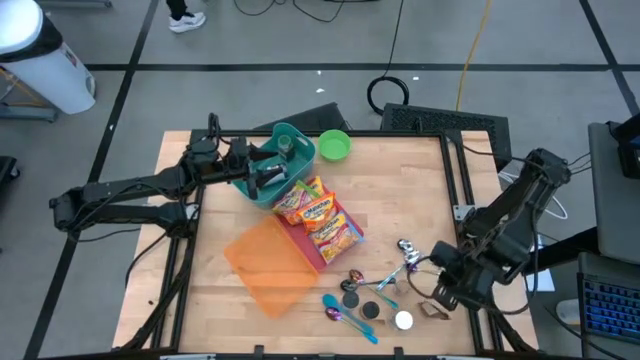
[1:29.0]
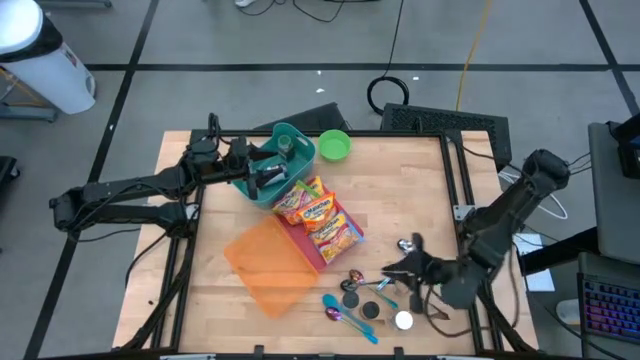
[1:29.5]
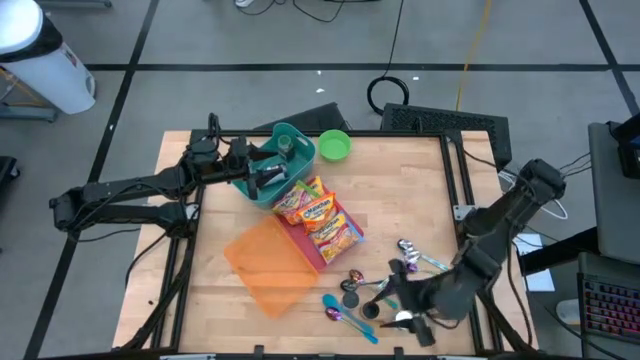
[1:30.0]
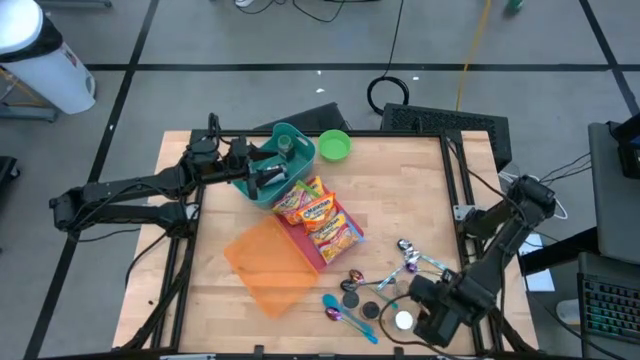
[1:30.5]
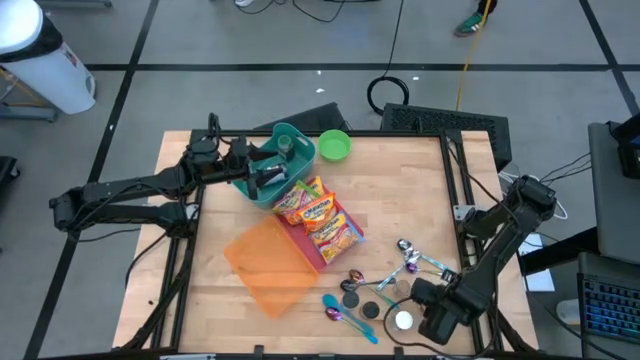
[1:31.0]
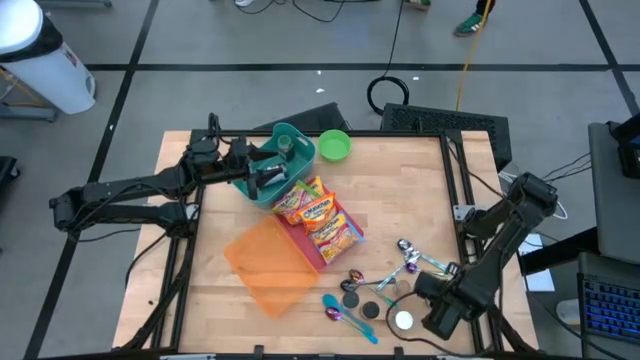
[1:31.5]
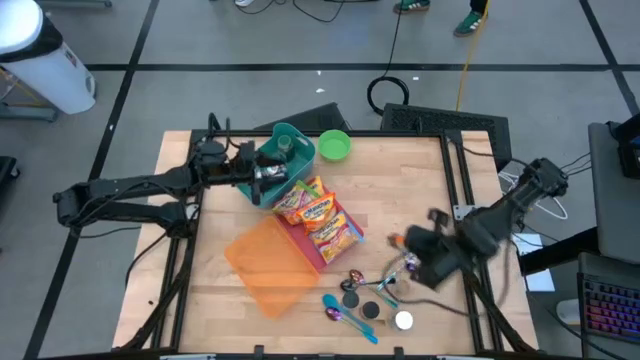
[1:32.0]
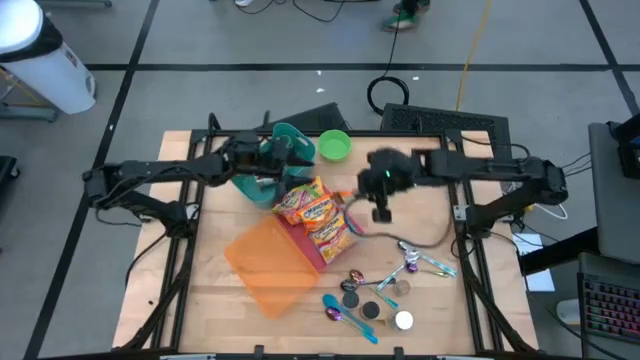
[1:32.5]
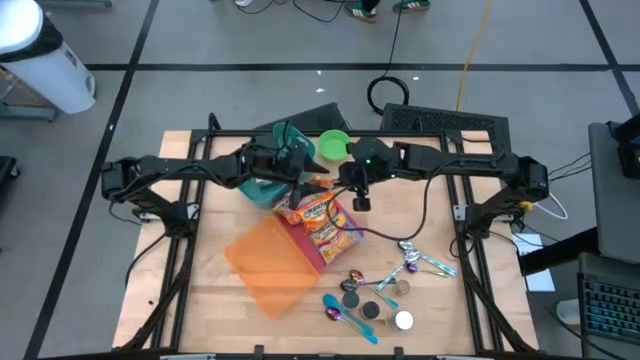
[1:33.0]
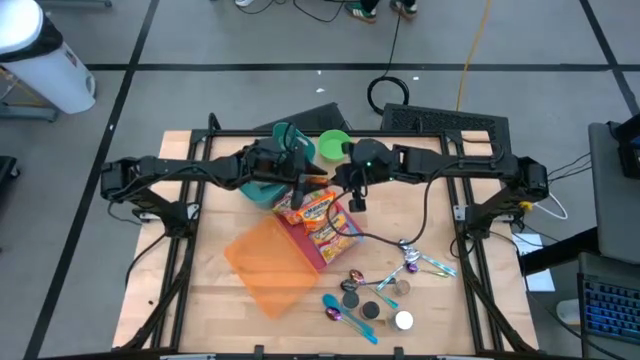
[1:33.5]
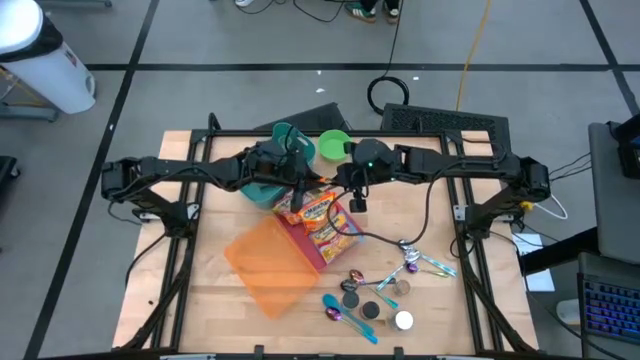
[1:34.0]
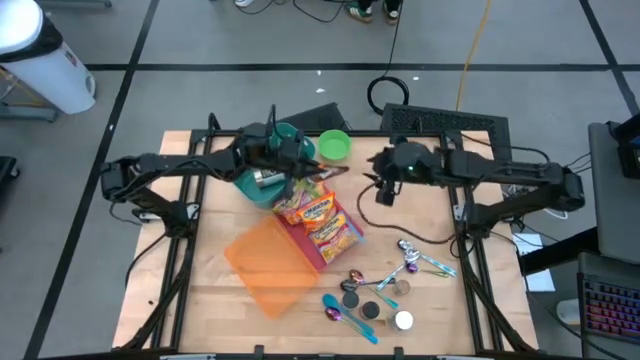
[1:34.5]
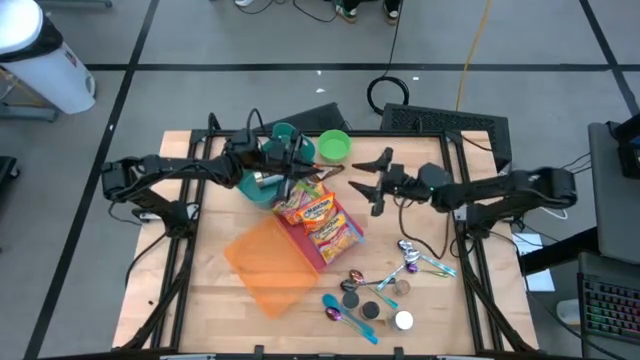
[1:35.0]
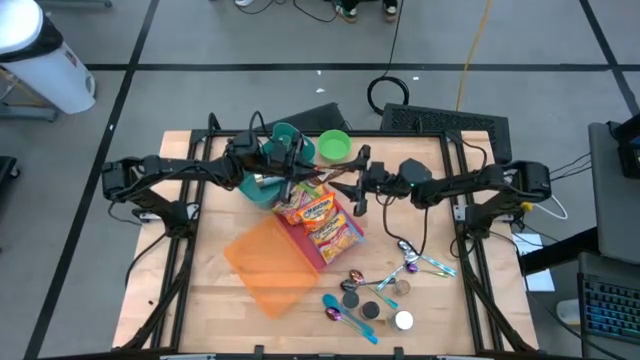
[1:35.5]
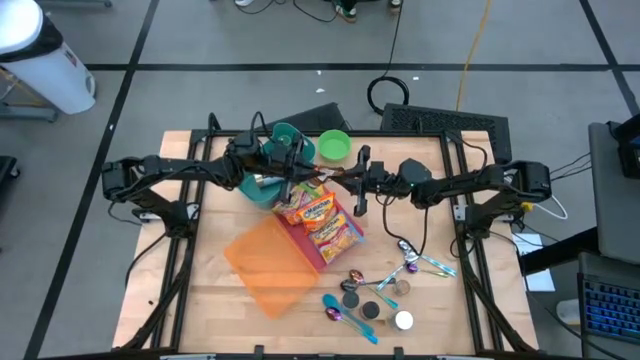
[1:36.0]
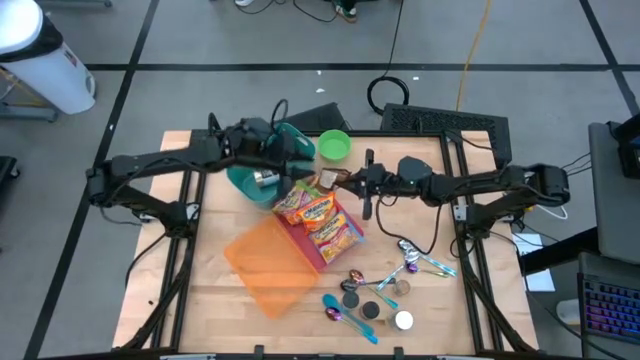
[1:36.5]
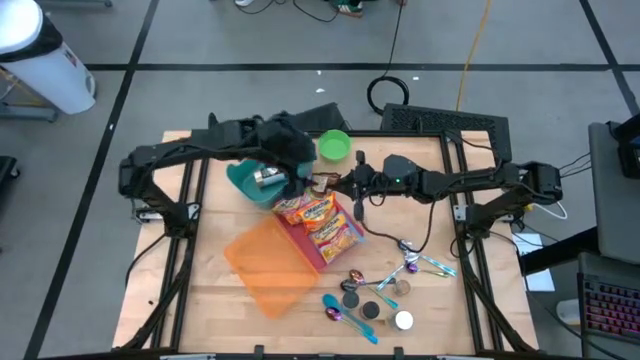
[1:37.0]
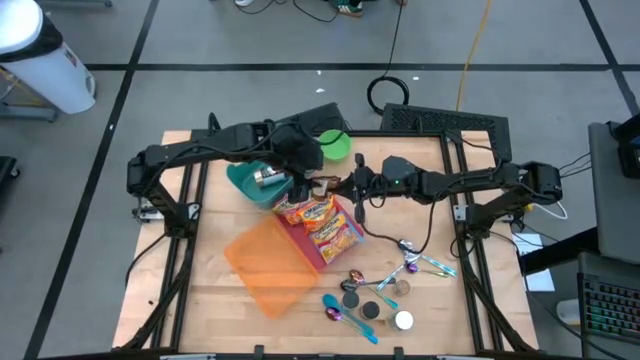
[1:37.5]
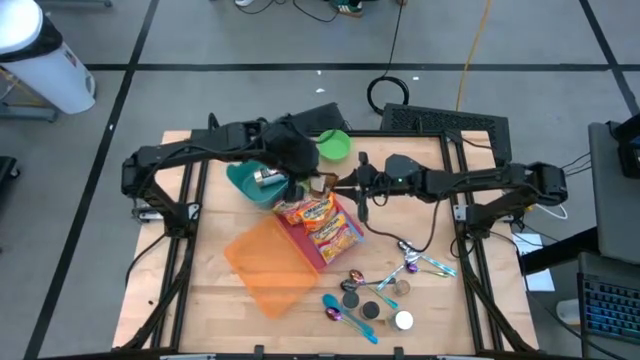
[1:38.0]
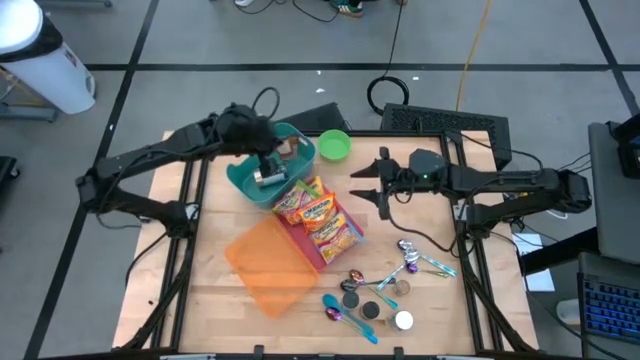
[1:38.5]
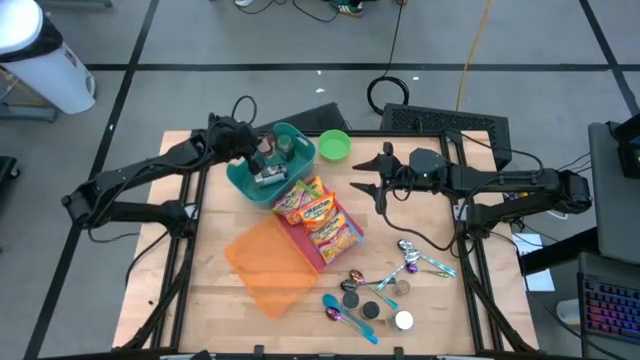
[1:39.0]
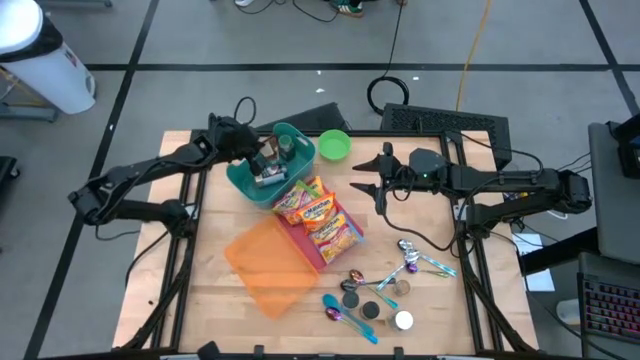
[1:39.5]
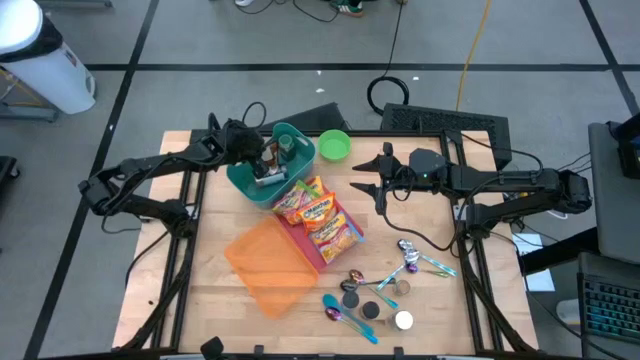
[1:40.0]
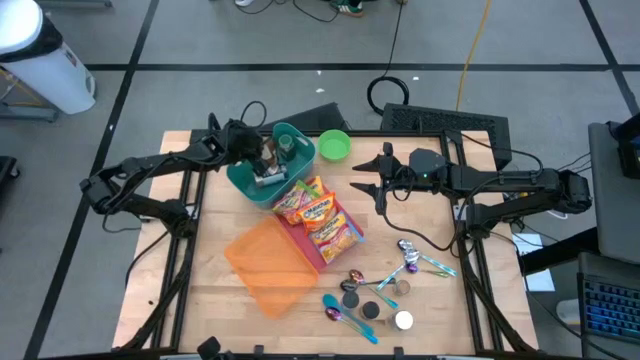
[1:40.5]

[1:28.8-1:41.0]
Task: Pick & Place Food Item
Put the orange seasoning pack into the green bin

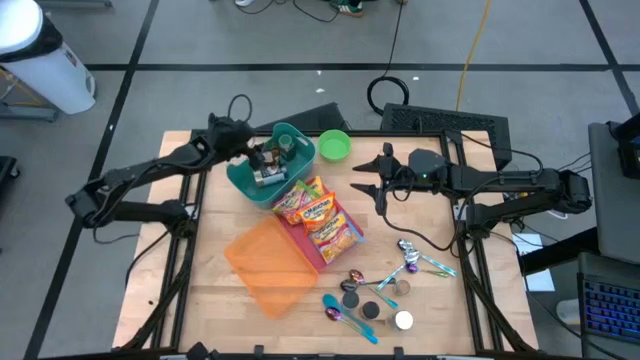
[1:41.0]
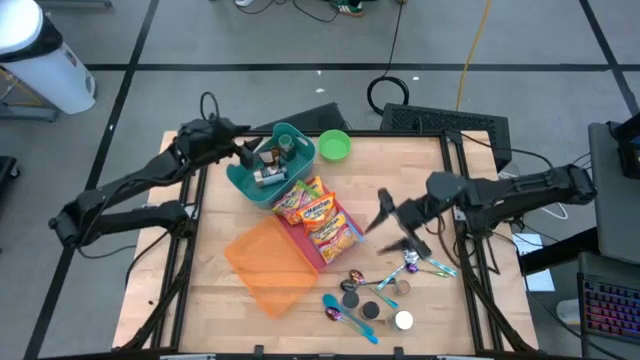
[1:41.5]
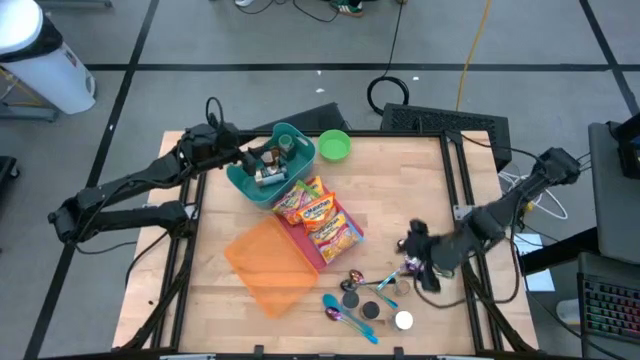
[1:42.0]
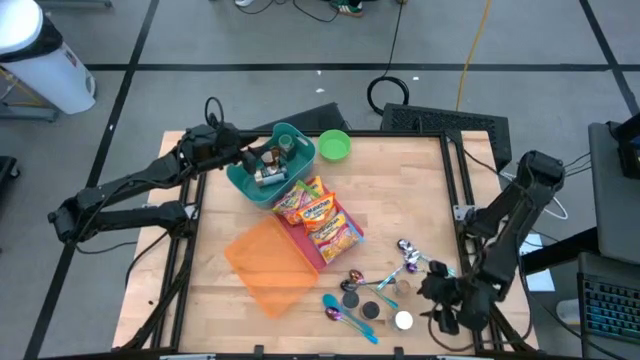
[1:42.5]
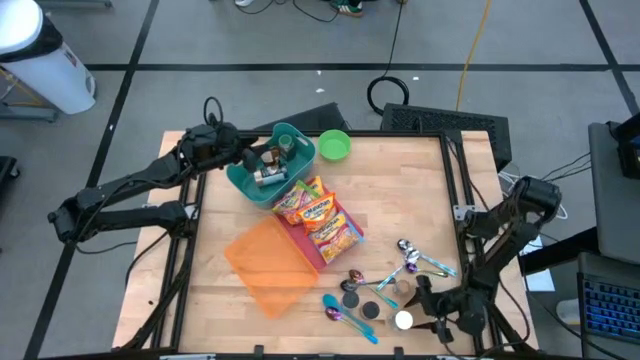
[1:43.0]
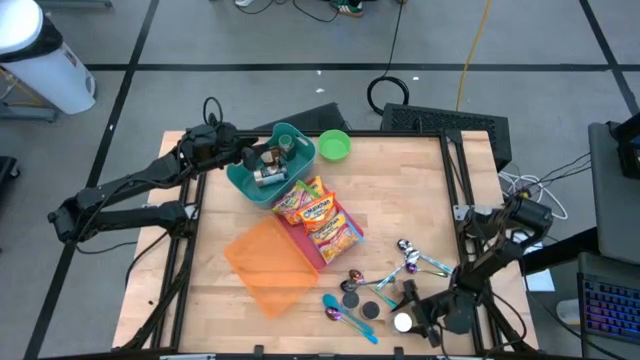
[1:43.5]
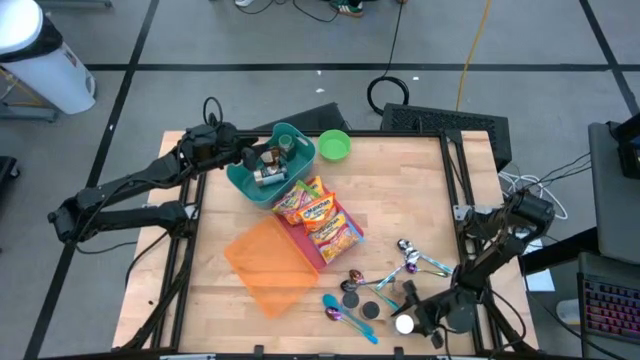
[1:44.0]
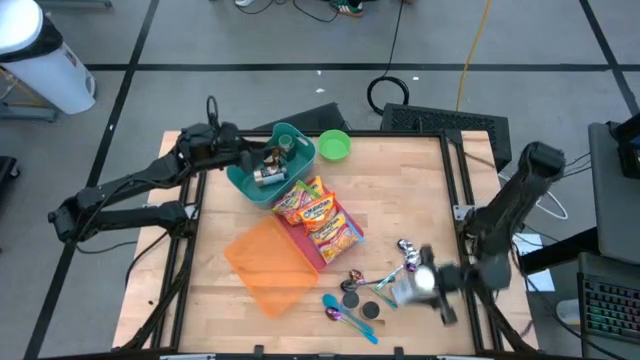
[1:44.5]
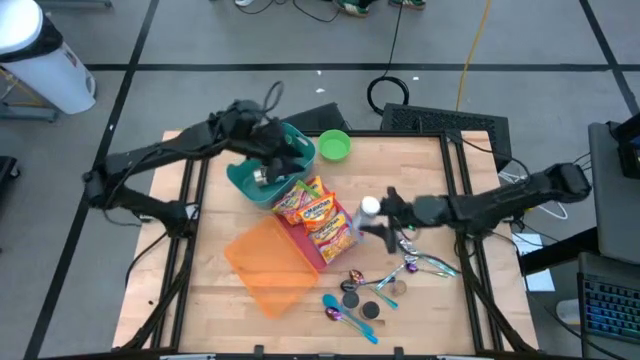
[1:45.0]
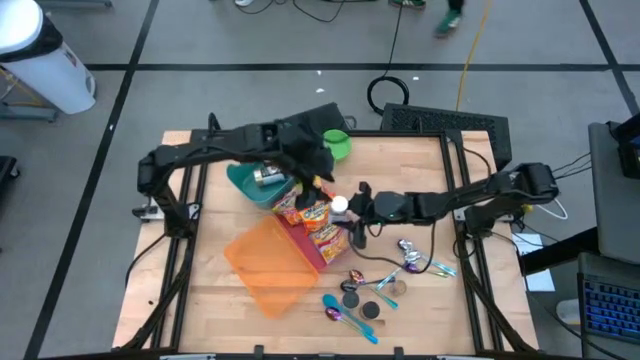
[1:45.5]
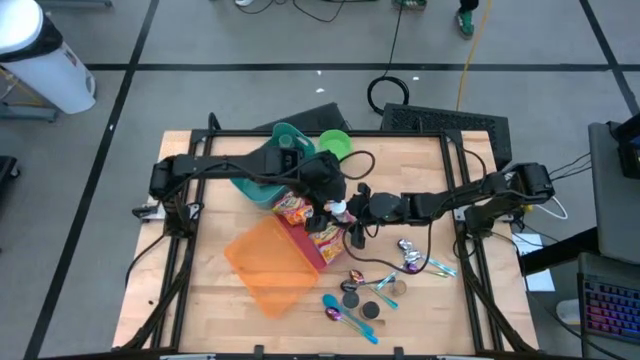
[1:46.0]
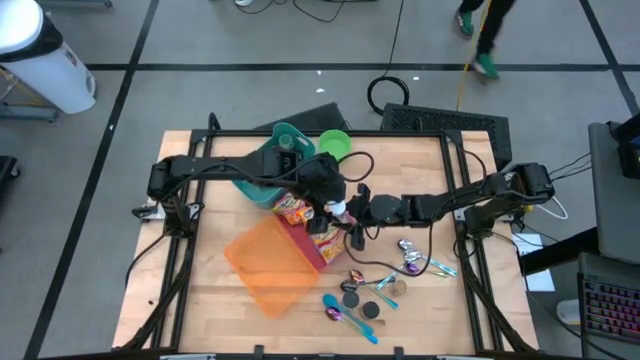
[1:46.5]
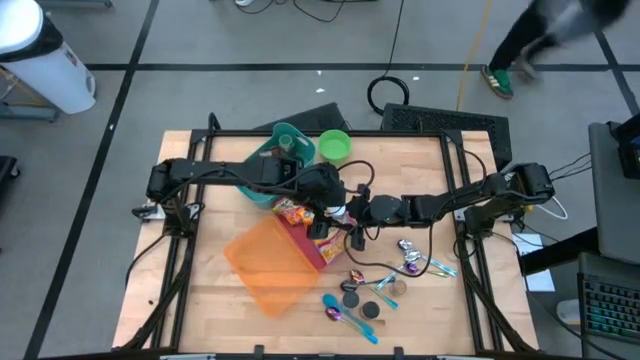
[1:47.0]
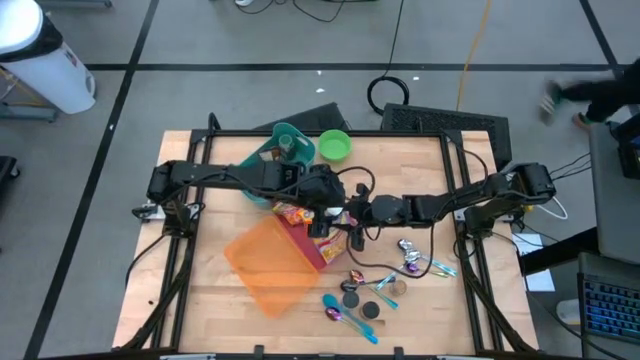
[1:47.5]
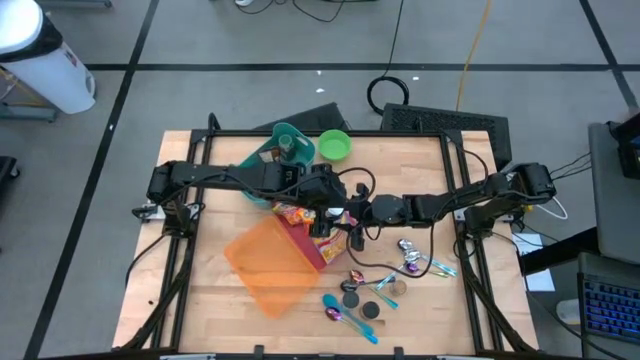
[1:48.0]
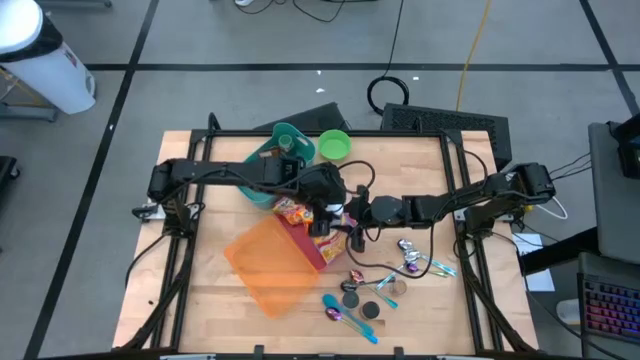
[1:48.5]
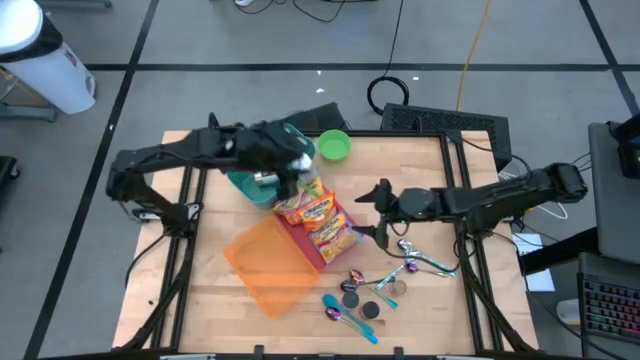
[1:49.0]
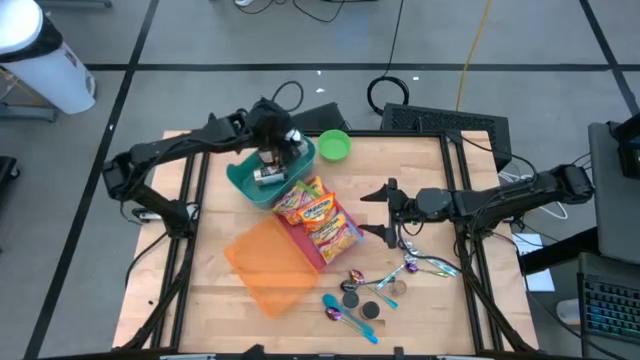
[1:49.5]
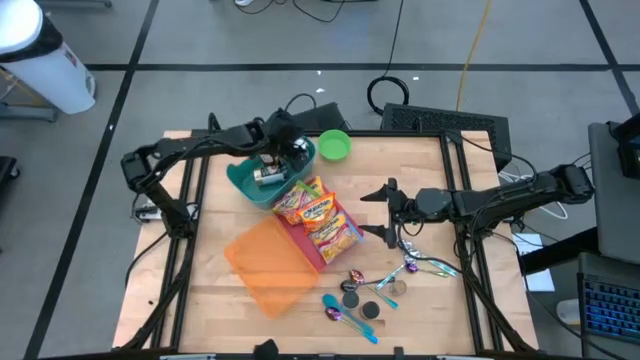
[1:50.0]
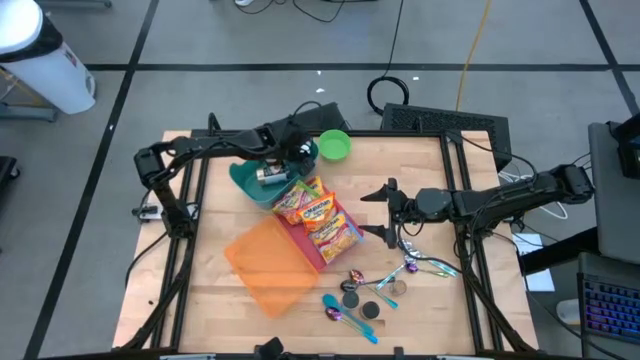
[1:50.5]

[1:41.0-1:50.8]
Put the white seasoning bottle into the green bin
